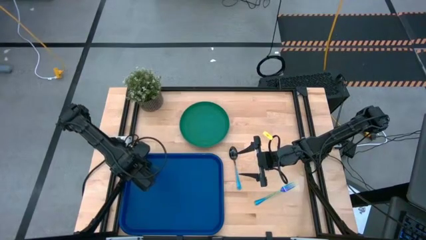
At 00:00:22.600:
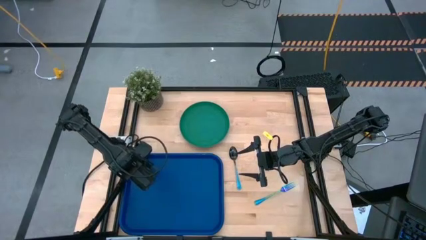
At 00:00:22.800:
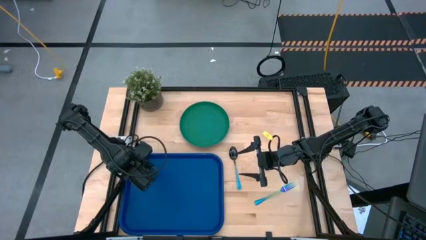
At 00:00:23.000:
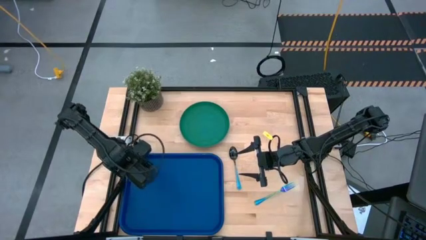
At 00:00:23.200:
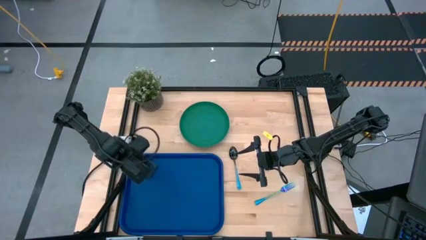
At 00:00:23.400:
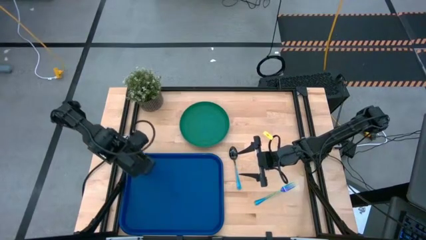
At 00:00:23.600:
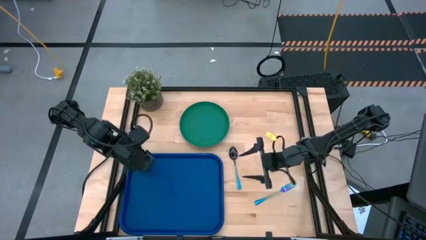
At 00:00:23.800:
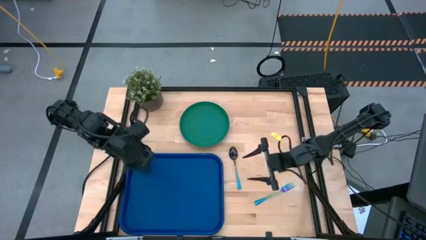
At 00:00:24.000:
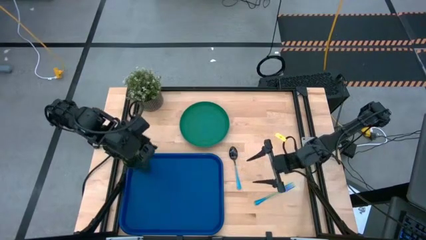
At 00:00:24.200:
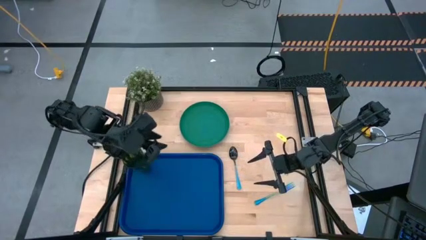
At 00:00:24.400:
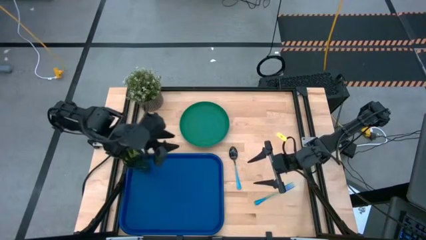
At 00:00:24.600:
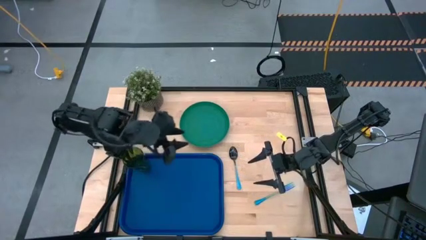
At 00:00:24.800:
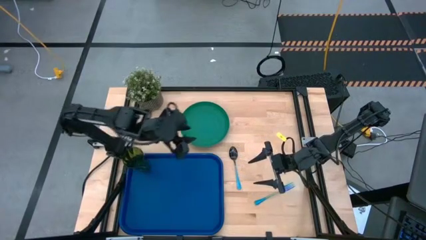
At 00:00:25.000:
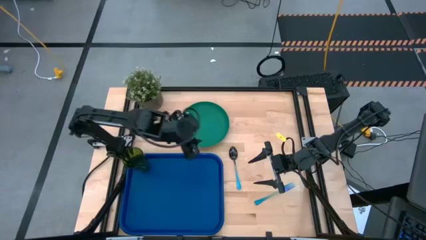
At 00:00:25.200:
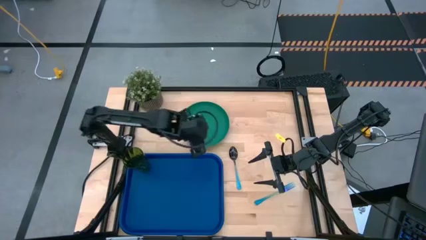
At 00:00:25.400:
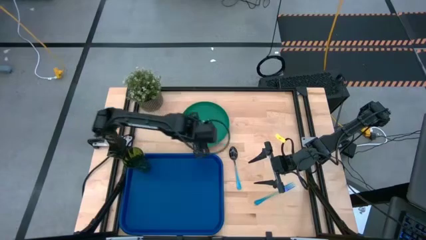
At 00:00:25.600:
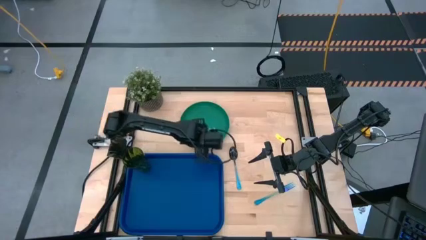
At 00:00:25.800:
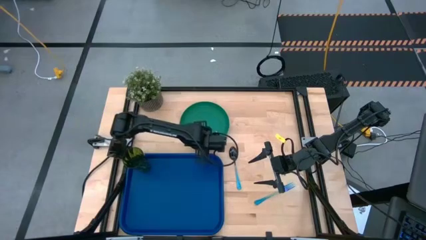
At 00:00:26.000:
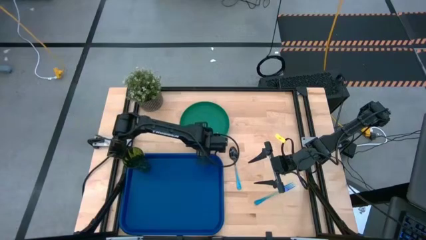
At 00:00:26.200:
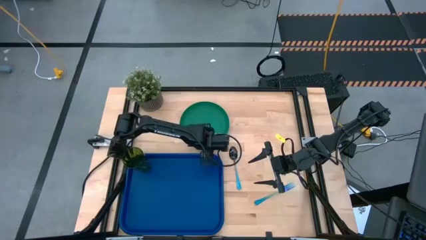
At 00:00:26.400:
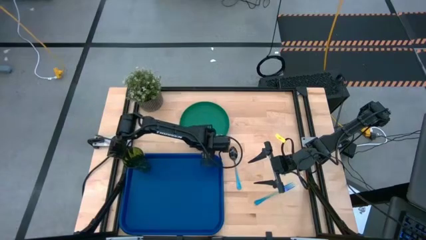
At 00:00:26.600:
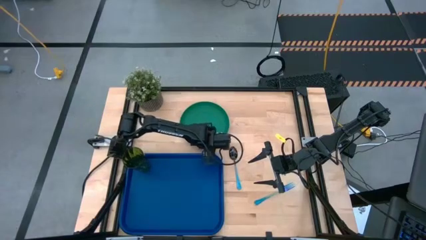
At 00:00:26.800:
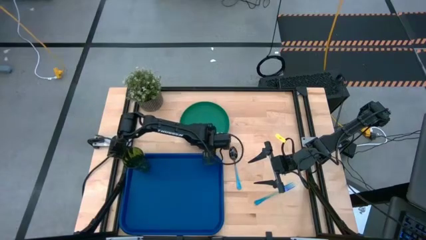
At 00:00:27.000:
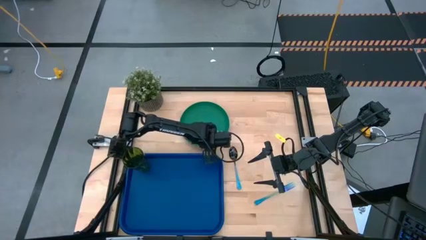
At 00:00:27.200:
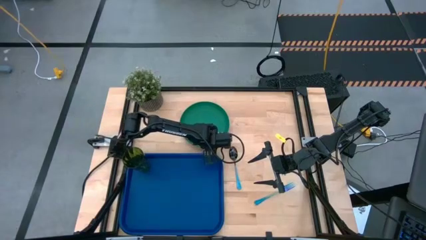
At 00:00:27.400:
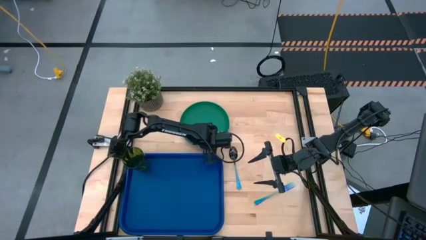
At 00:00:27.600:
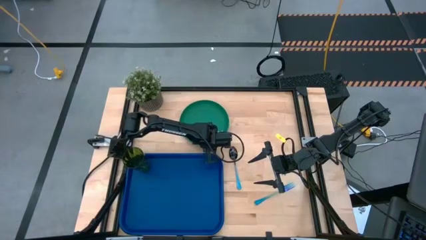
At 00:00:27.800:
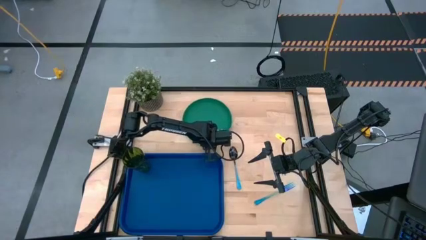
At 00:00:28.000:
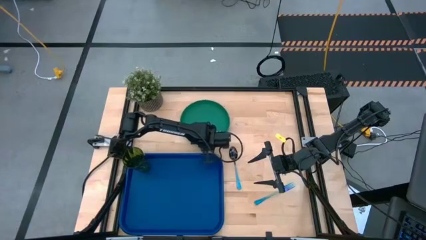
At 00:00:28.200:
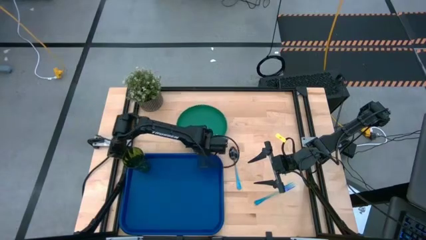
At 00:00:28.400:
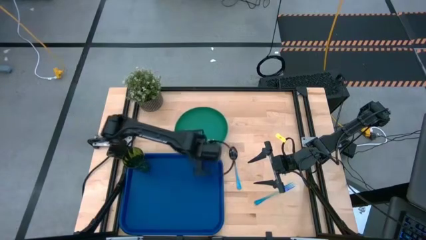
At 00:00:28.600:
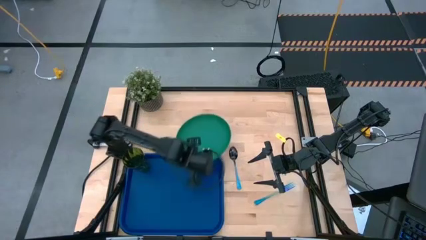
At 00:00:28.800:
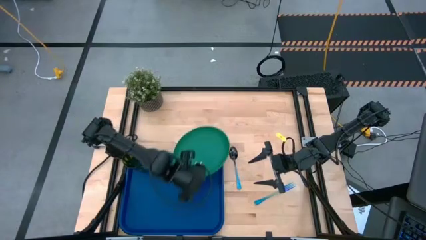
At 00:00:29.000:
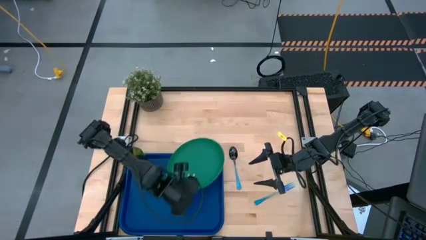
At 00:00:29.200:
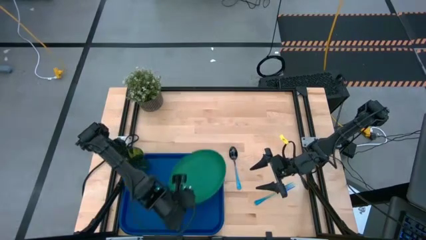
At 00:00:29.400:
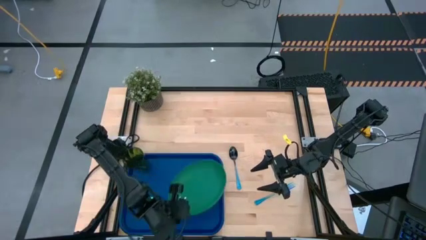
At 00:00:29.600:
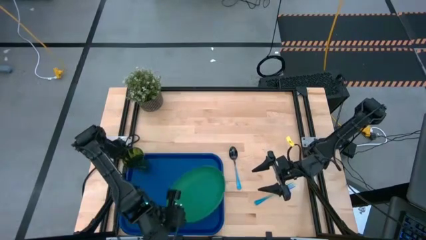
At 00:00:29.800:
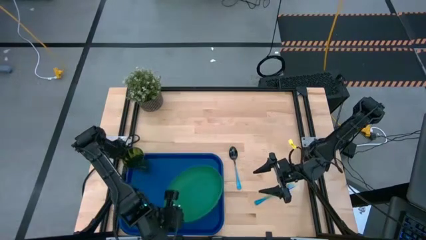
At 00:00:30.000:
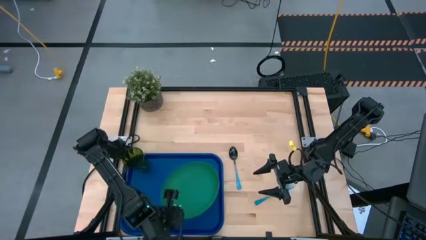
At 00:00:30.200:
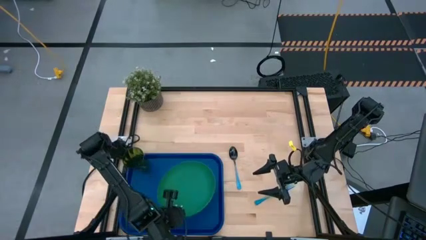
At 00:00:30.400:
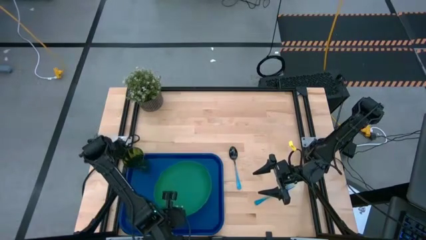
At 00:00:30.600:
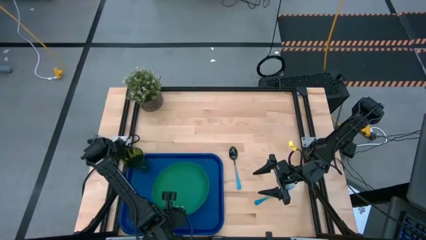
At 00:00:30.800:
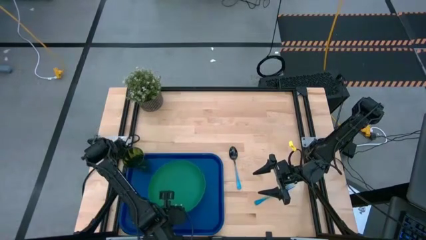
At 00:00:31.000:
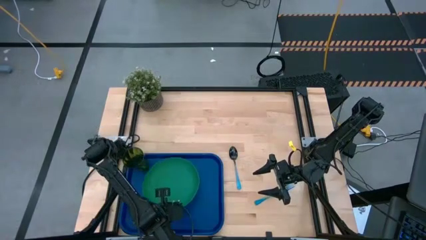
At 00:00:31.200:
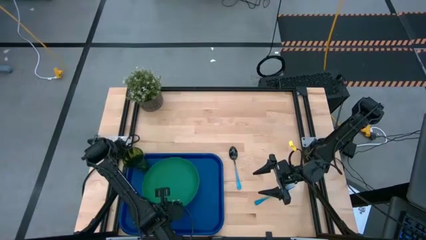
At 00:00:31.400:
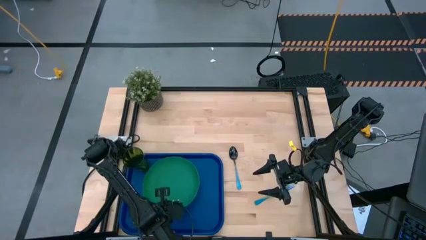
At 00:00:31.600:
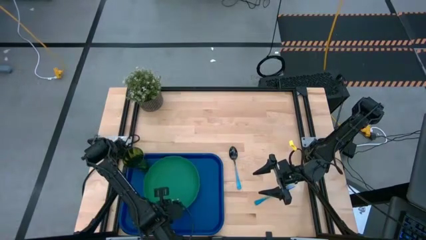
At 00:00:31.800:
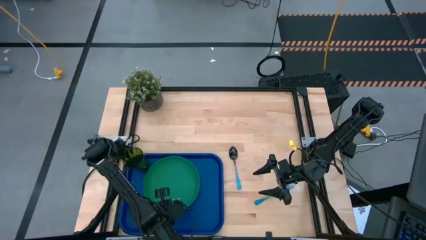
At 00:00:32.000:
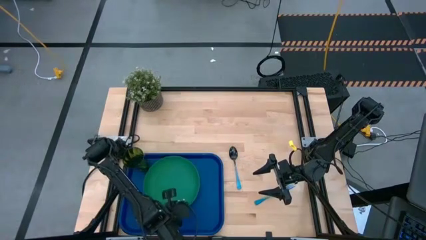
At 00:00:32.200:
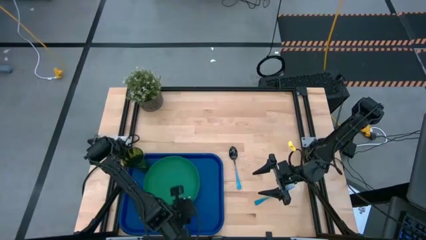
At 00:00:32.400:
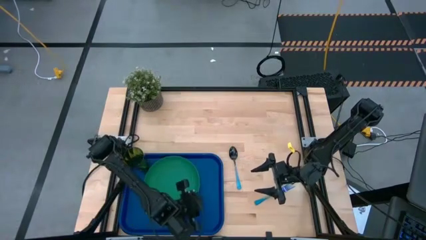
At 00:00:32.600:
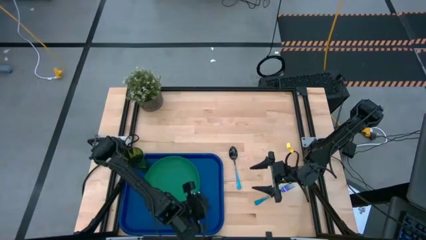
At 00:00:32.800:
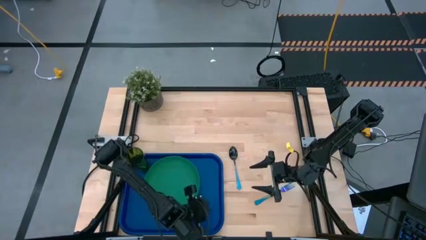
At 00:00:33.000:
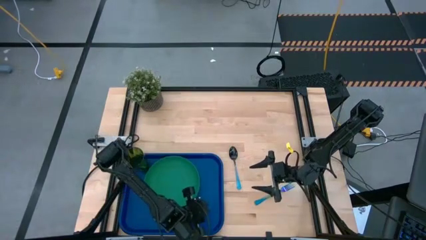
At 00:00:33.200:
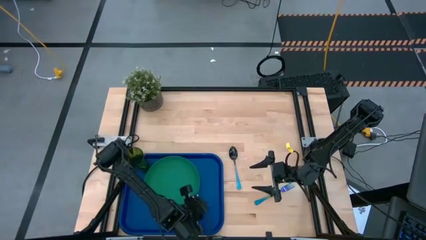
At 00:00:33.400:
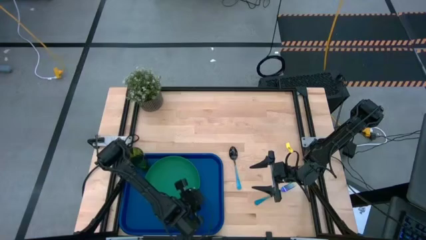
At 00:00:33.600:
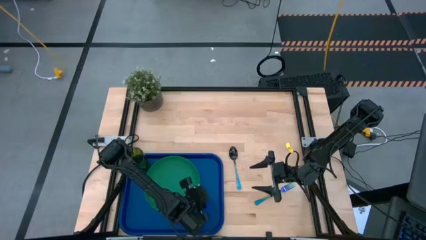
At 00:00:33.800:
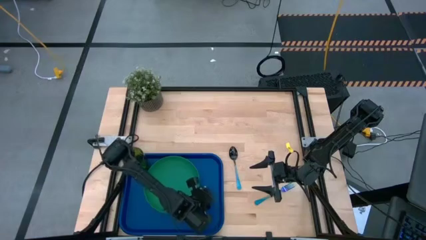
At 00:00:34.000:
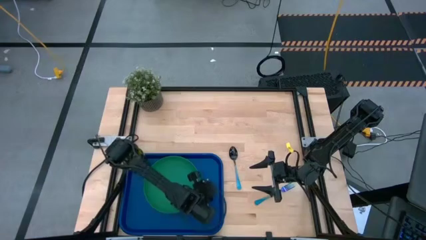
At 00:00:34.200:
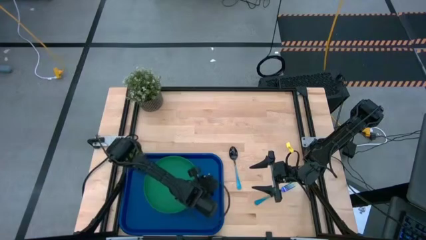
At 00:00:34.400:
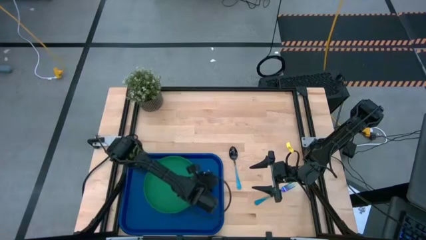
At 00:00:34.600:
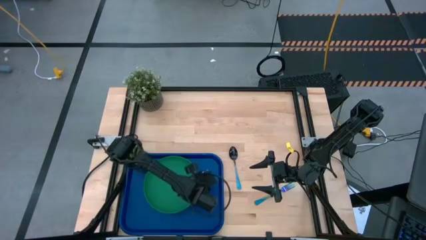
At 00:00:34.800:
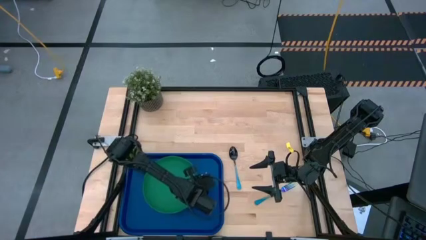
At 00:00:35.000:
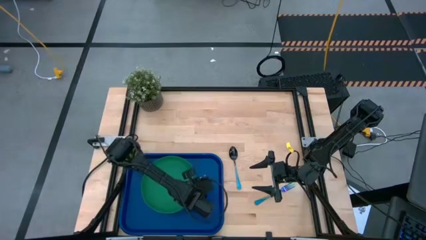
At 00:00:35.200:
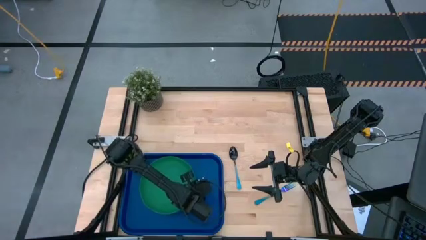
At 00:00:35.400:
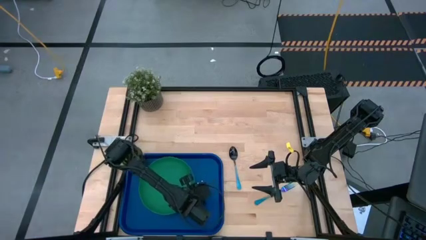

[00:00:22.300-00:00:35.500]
Task: Pick and place plate/cup/fork/spoon on tray
Put the green plate on the dark blue tray
